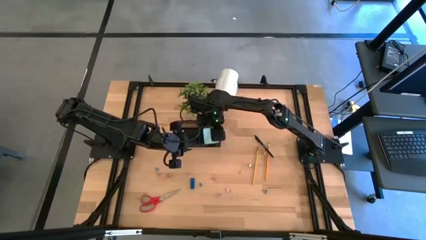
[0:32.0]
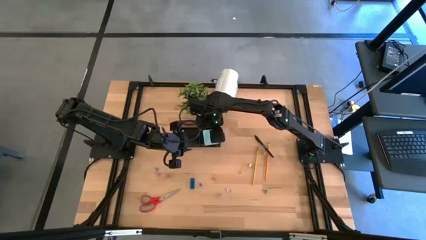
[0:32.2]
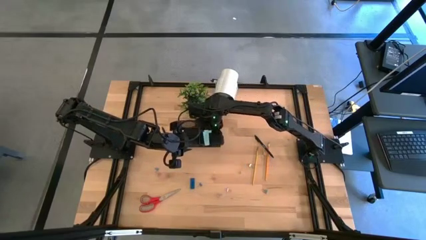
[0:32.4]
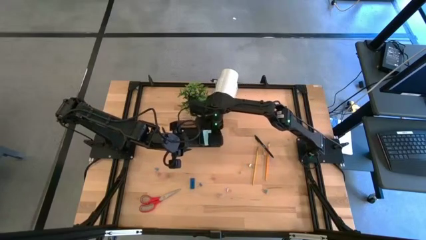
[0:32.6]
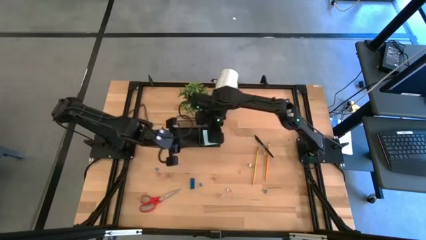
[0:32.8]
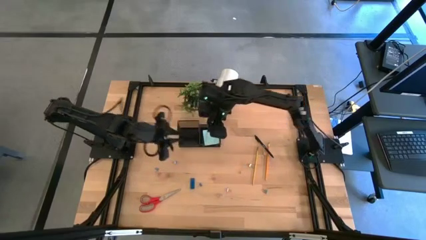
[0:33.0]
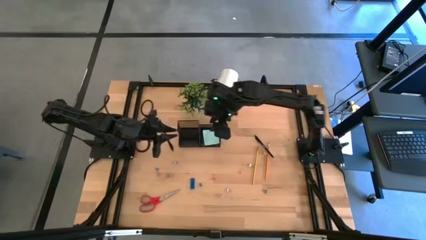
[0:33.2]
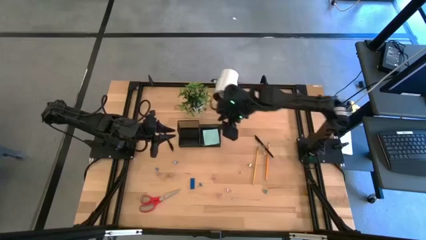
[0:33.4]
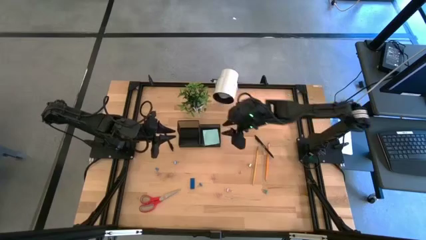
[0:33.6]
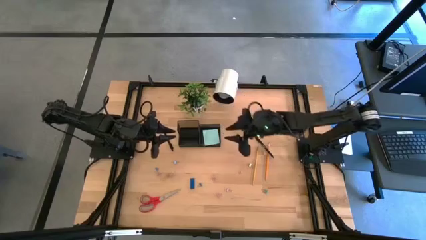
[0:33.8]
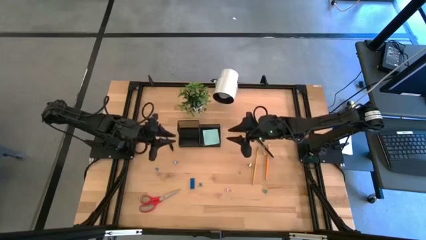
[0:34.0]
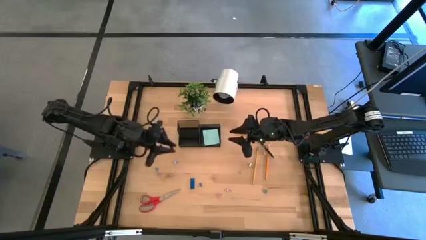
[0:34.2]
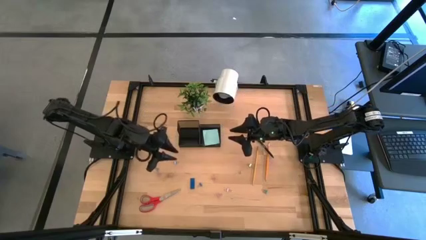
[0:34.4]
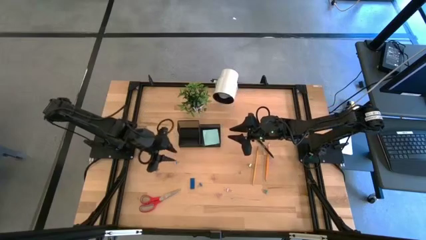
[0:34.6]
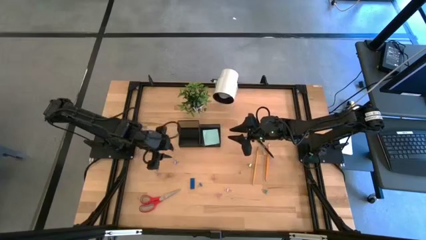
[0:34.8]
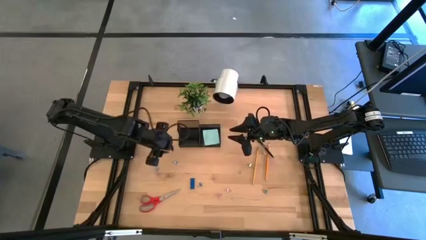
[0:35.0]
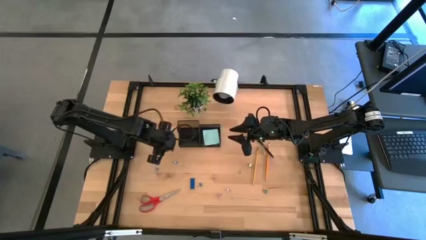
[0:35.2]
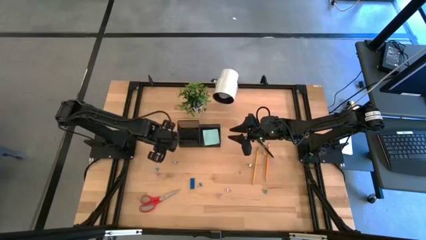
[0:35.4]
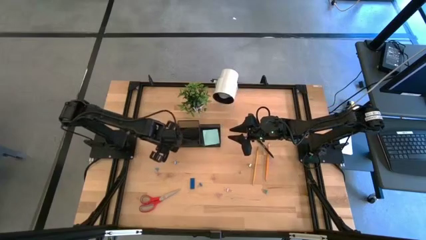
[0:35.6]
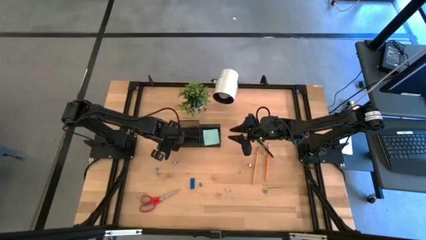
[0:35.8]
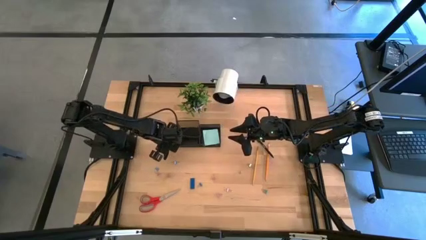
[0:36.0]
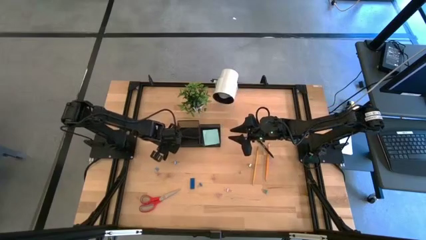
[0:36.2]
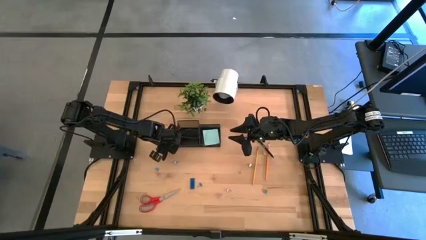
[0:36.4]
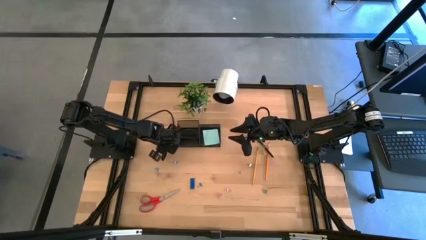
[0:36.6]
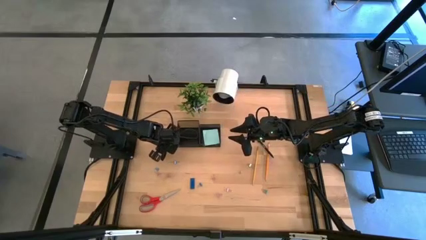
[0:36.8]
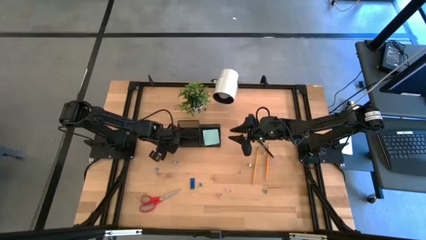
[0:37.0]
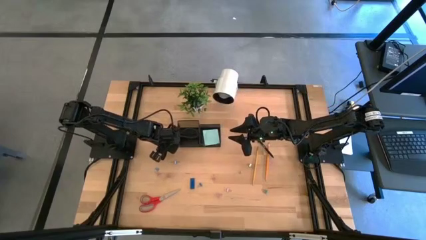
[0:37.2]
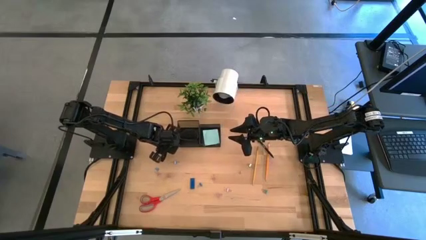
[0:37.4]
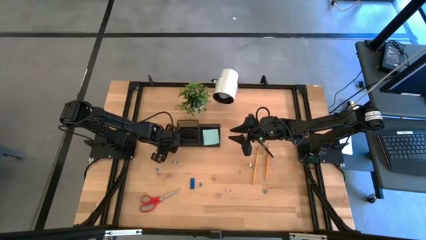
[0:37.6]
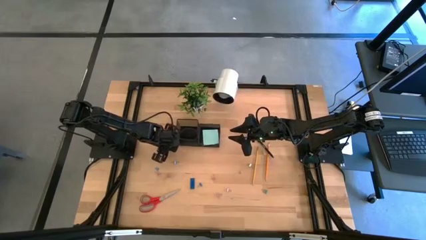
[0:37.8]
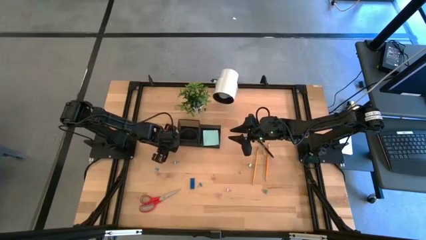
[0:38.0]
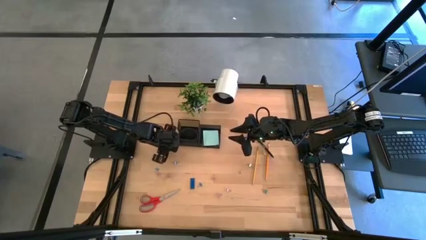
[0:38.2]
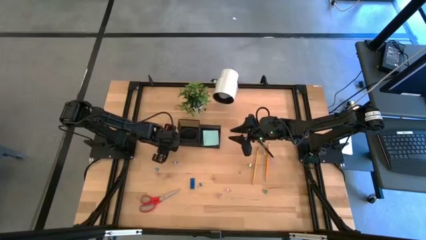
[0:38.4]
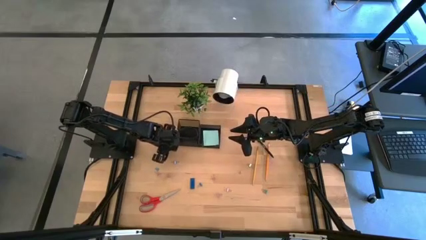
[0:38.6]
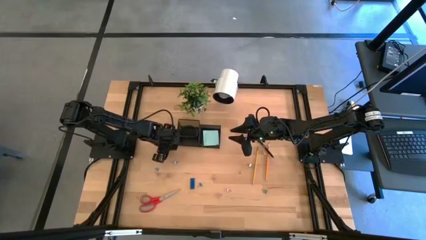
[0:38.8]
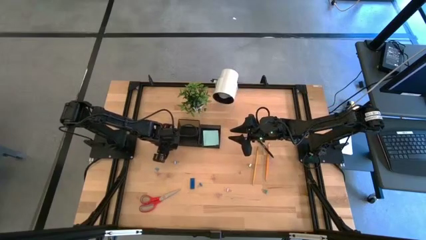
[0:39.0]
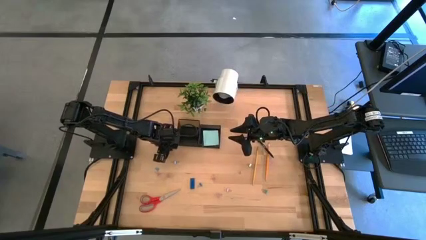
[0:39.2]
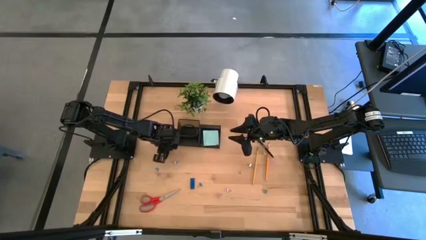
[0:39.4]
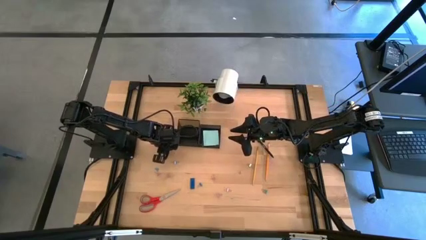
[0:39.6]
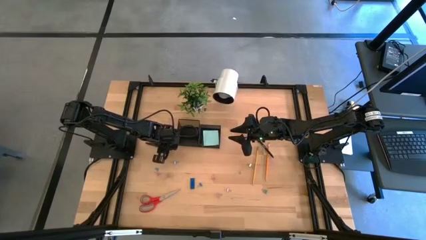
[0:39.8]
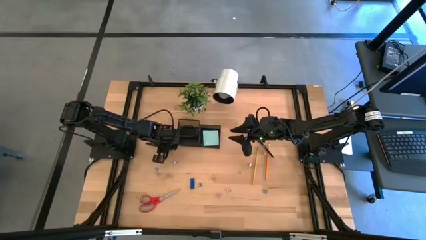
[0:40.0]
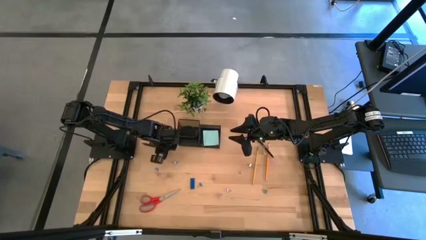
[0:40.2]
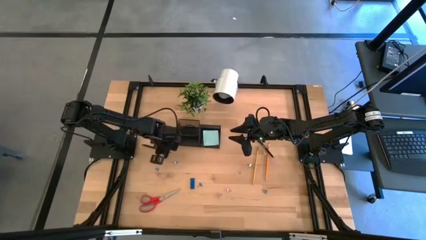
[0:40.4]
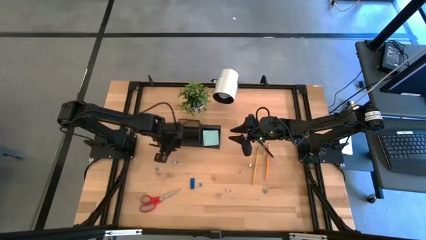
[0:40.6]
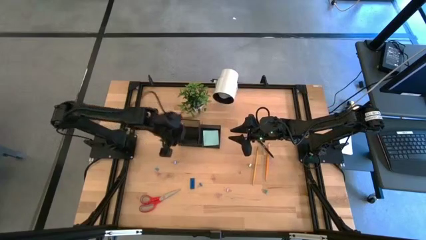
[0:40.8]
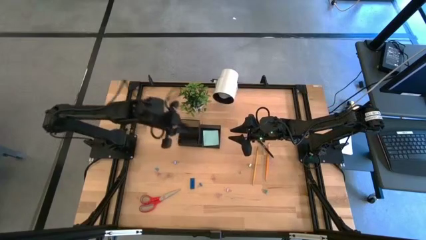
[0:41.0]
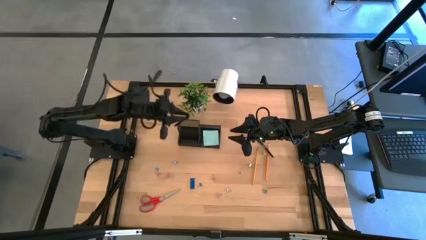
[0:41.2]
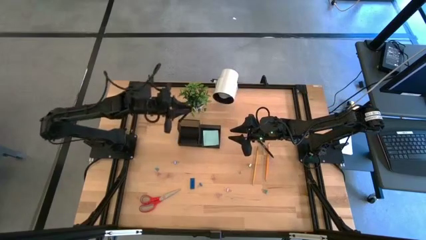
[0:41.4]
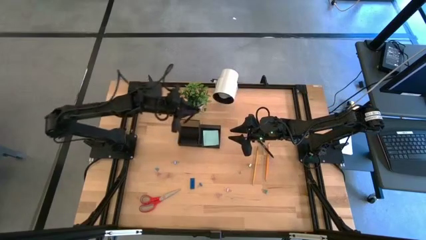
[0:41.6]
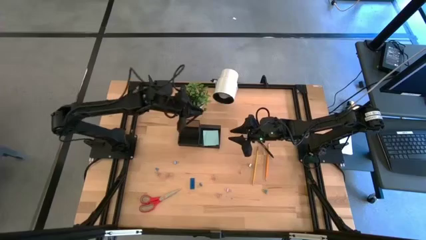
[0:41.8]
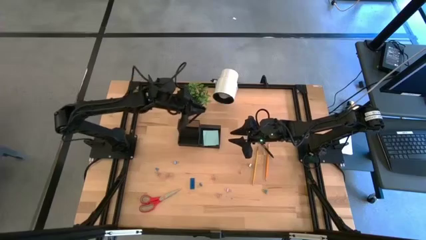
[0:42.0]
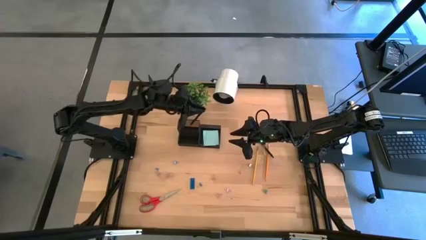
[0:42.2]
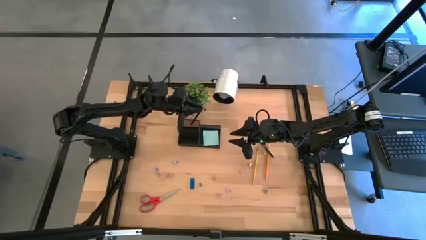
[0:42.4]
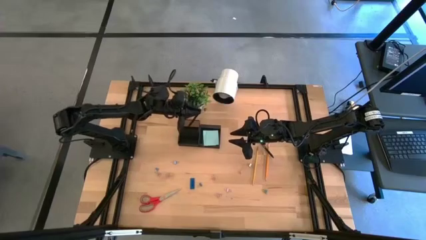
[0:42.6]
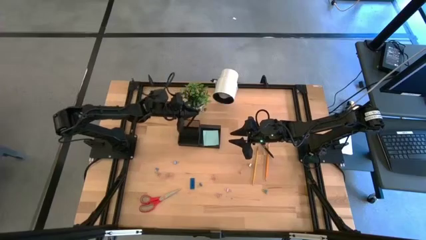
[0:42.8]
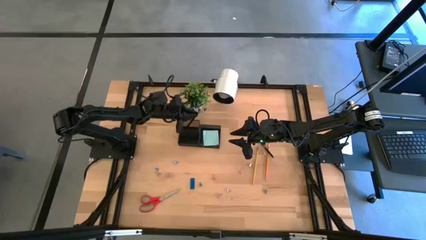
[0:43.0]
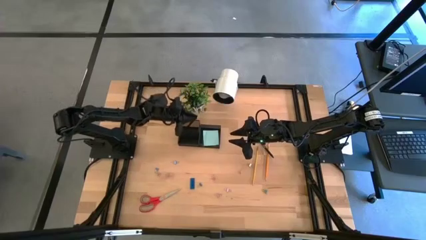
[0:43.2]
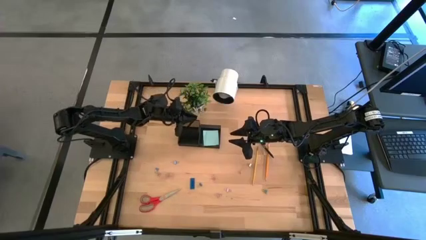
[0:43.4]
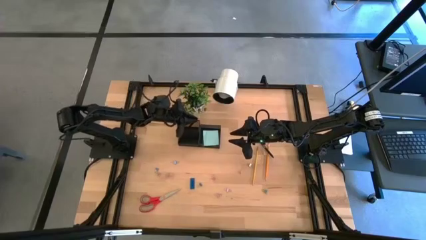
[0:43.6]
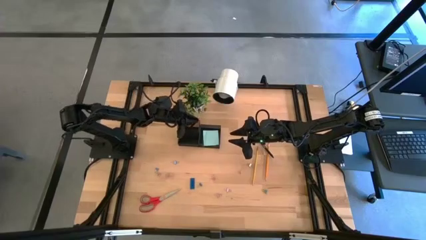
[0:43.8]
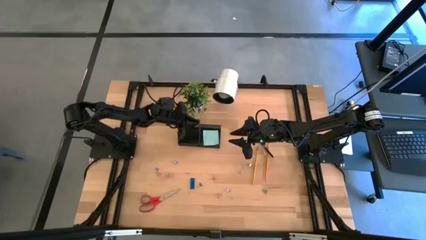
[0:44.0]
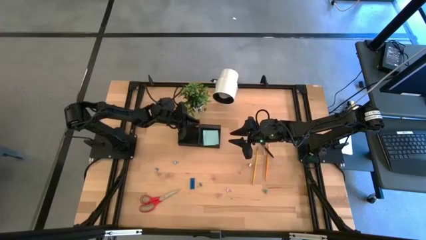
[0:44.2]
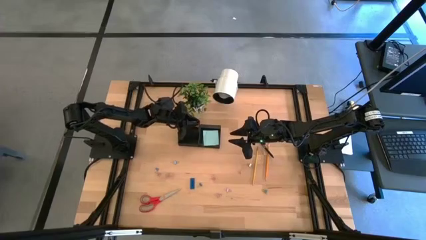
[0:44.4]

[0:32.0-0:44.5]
Task: Pick and place office supplies into organizer
Put the left black pen into the black desk organizer
